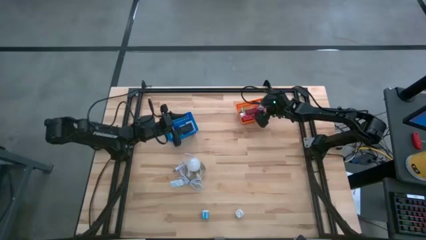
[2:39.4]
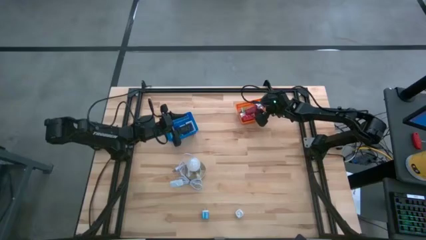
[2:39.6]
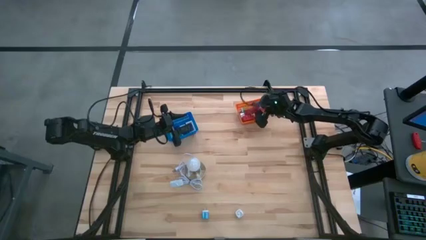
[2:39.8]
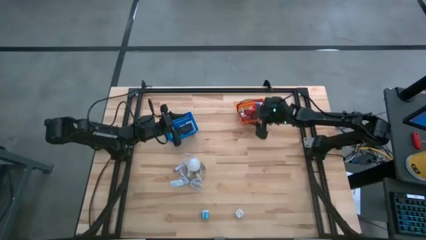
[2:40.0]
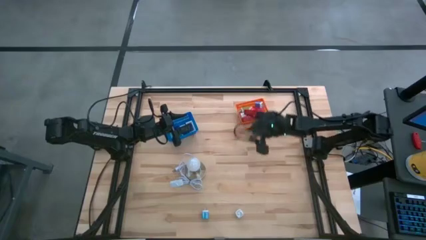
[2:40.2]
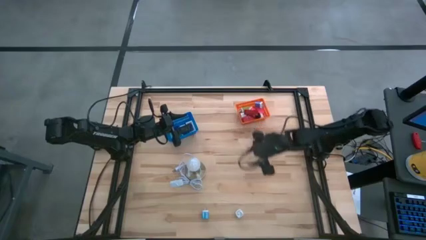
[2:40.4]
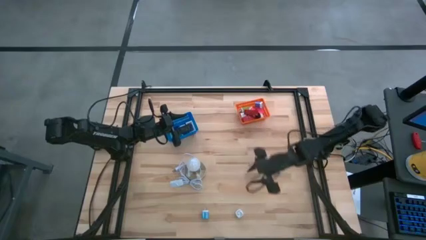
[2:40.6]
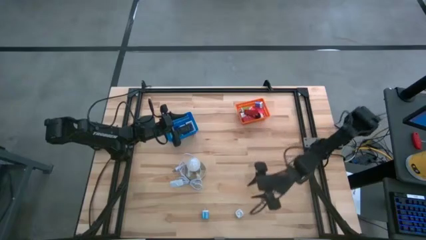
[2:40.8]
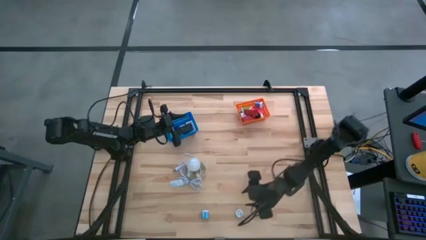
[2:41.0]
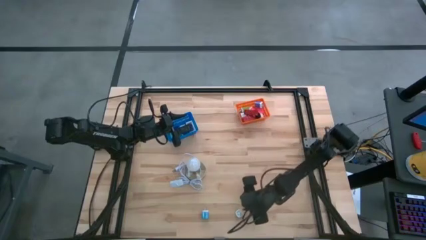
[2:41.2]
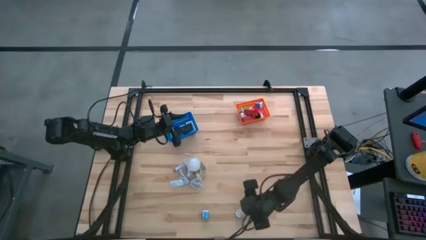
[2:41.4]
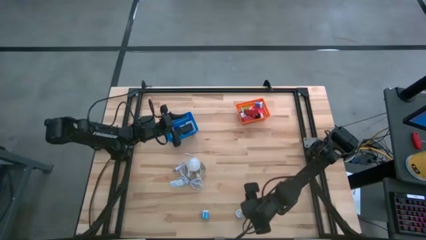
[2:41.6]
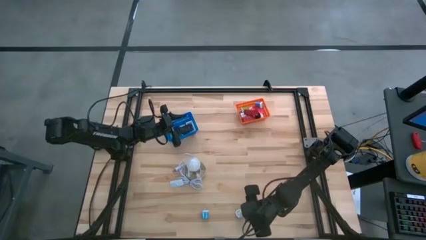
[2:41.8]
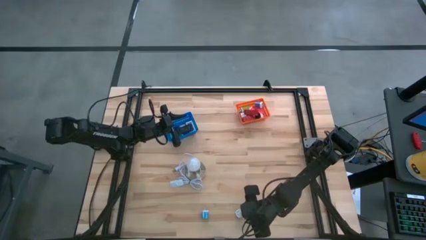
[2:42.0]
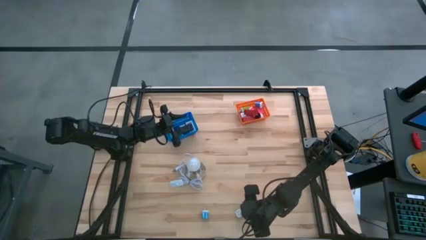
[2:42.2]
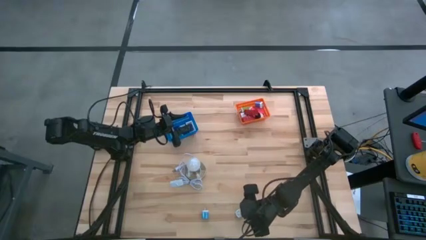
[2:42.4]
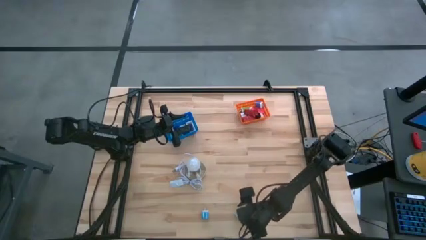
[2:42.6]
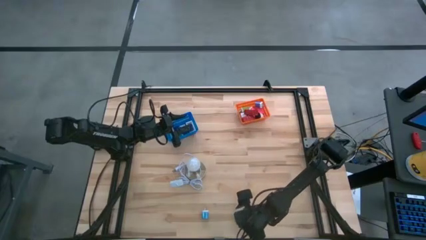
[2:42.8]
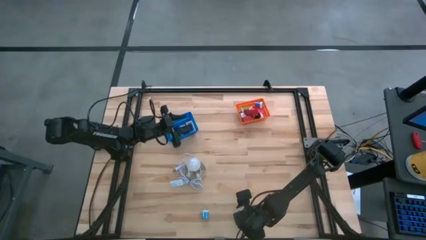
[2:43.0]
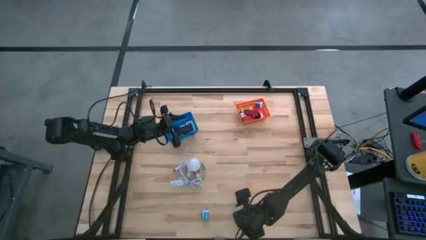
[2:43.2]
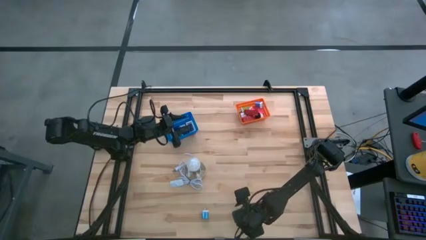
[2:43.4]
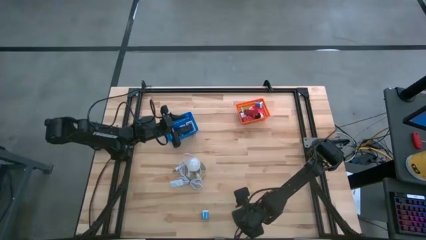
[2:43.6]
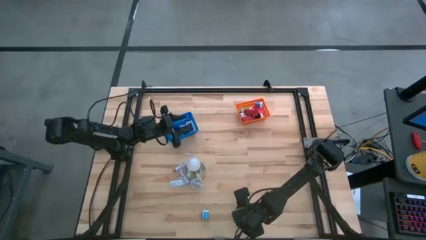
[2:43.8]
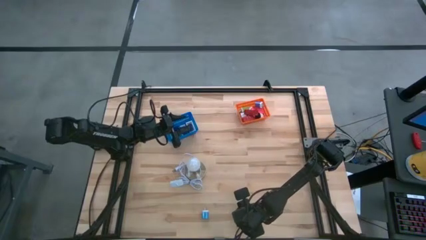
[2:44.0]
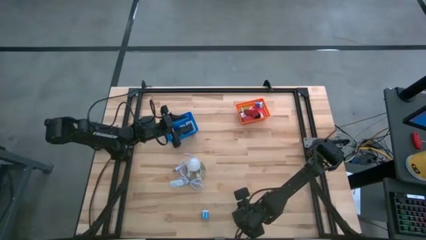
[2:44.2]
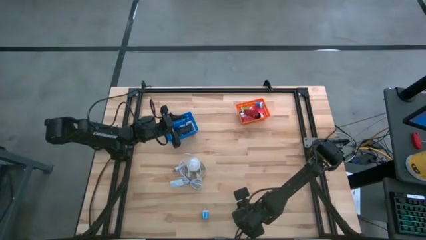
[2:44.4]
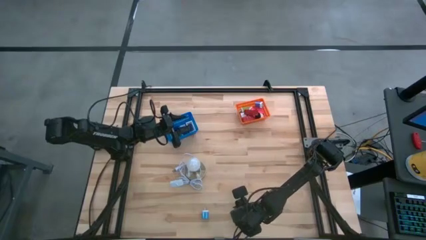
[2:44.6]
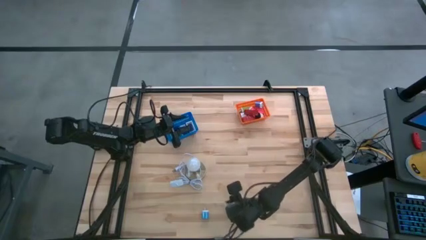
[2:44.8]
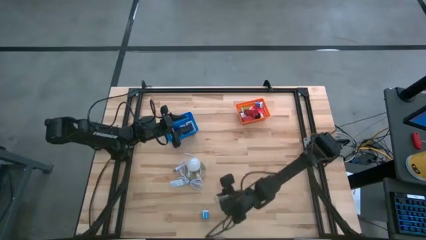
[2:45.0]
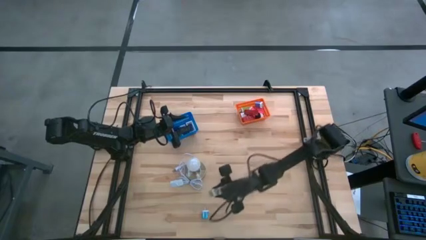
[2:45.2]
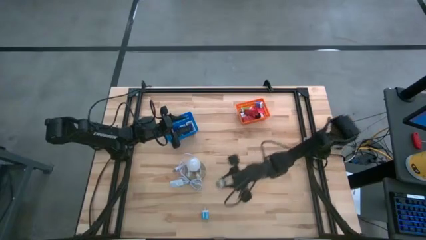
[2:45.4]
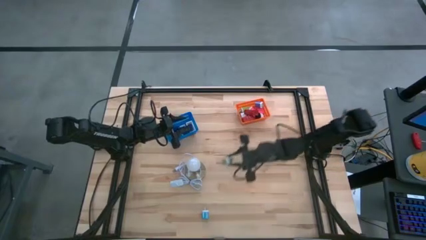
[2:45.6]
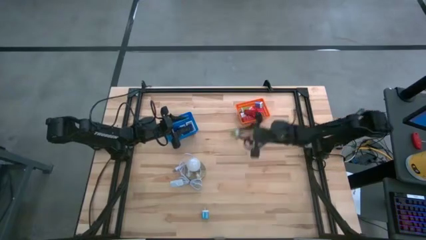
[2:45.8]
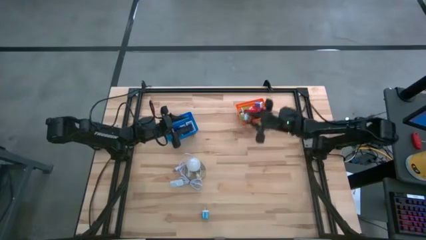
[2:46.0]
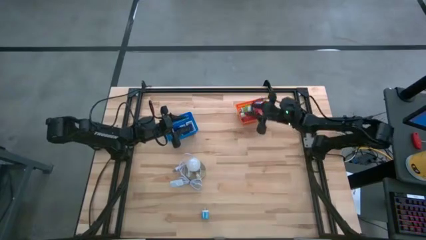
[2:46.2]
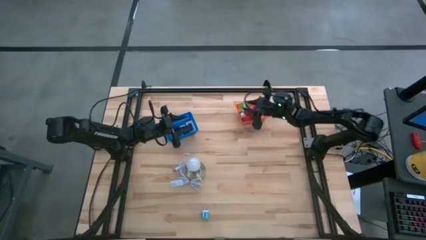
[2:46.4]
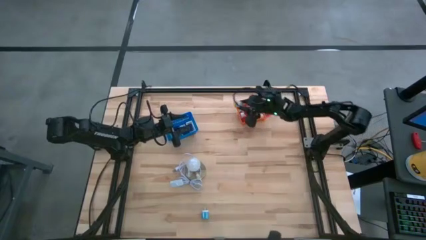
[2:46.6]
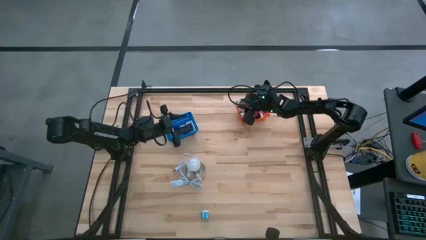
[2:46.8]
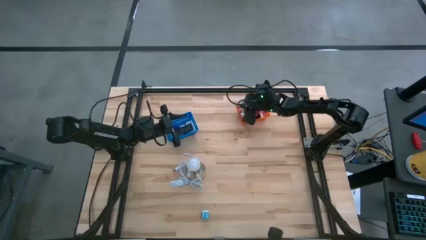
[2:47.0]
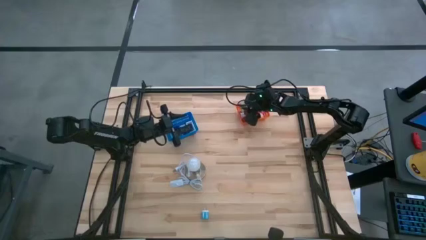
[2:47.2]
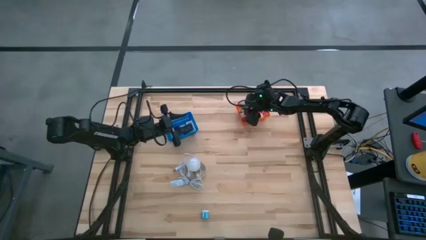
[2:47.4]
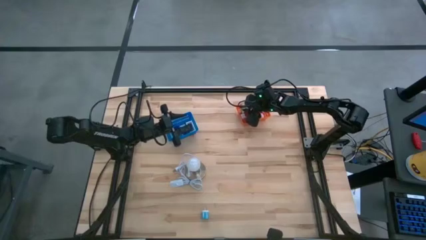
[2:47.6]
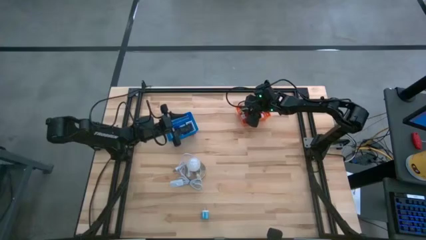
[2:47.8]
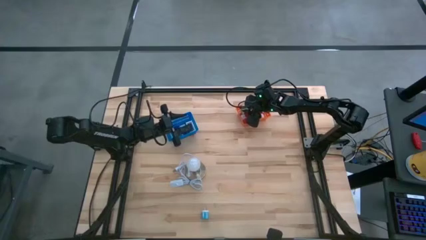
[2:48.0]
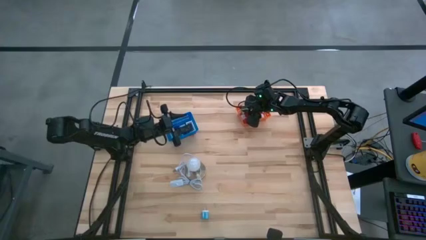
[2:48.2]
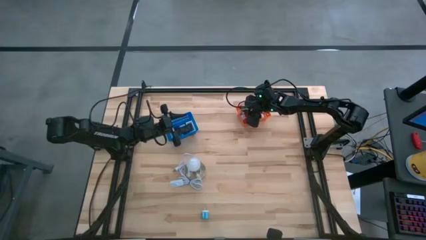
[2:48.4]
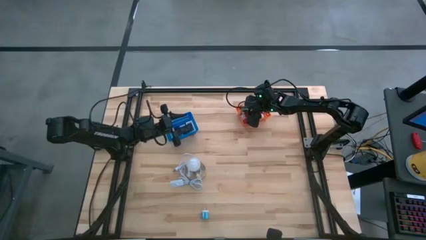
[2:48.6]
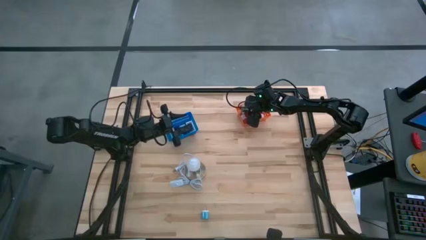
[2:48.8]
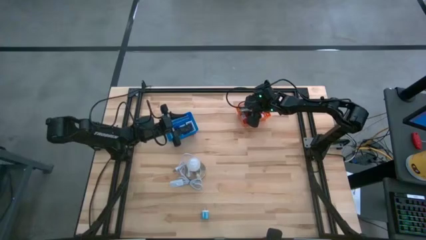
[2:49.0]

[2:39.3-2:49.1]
Task: Pick & Place Office items
Put the green charger adapter into the orange bin

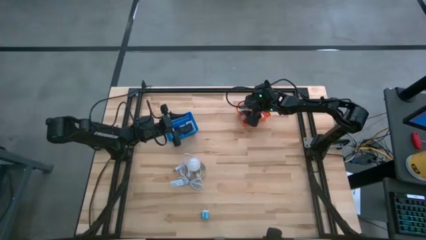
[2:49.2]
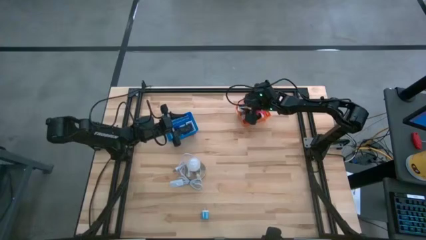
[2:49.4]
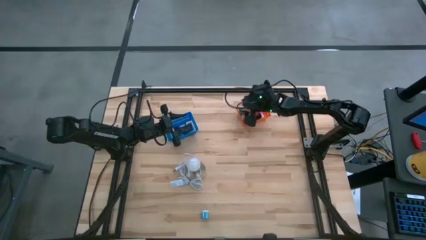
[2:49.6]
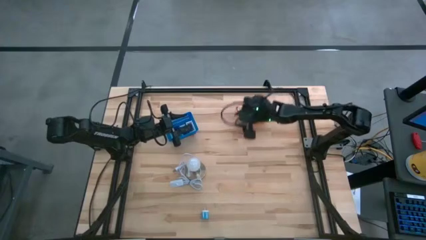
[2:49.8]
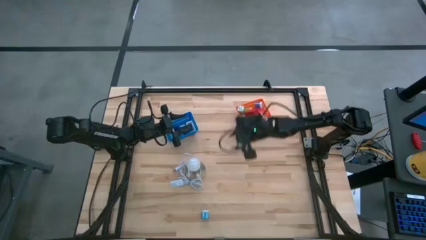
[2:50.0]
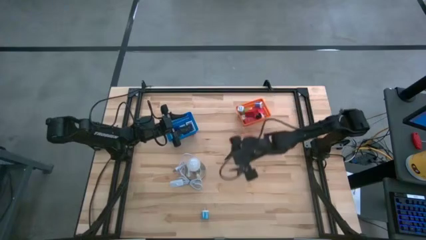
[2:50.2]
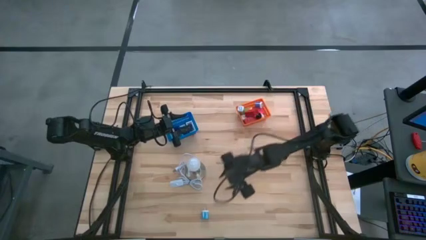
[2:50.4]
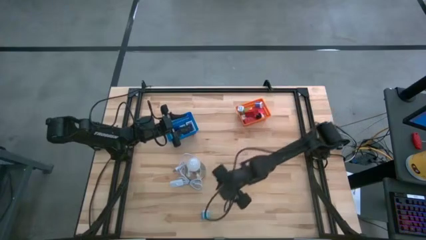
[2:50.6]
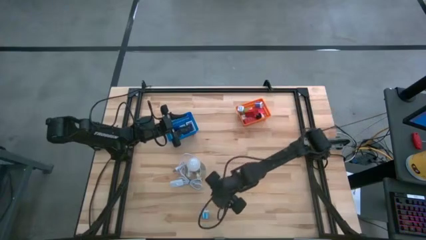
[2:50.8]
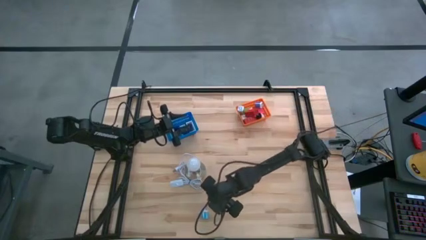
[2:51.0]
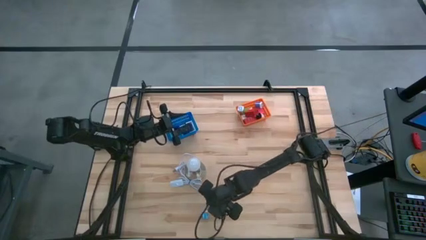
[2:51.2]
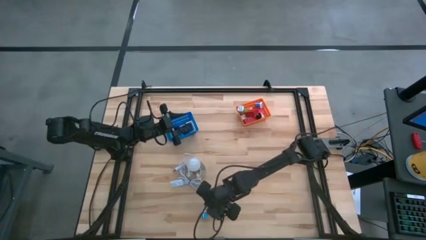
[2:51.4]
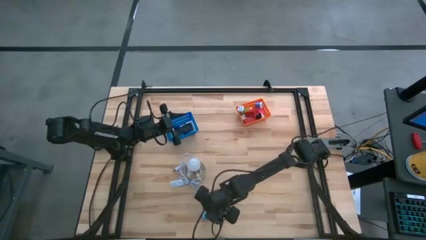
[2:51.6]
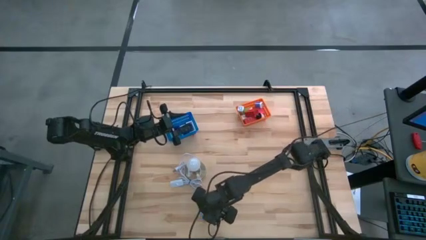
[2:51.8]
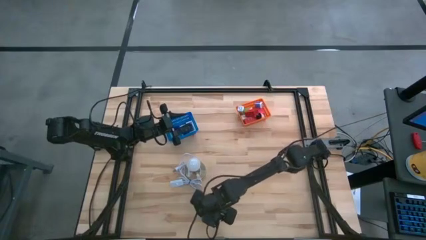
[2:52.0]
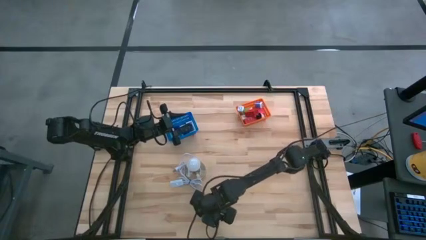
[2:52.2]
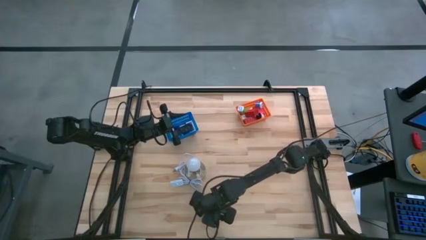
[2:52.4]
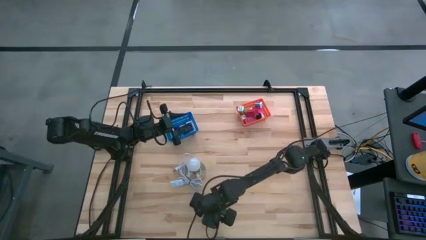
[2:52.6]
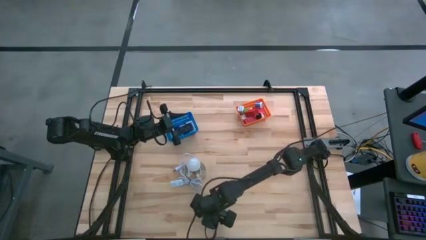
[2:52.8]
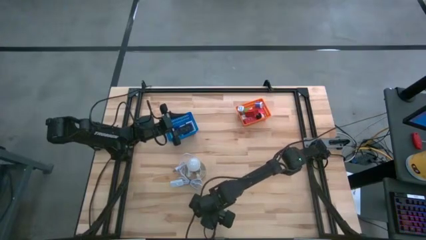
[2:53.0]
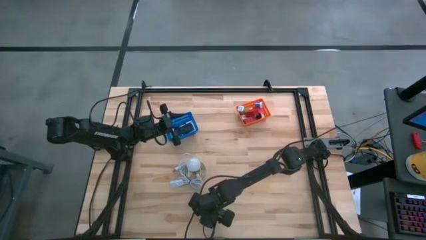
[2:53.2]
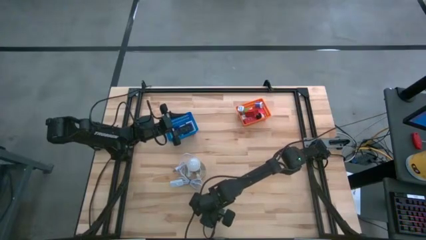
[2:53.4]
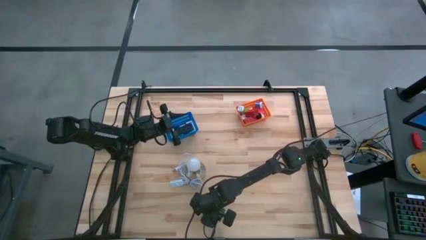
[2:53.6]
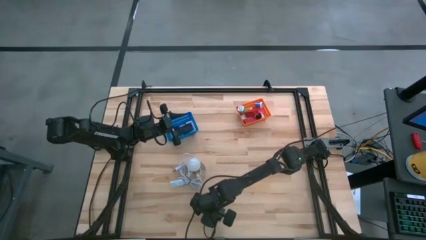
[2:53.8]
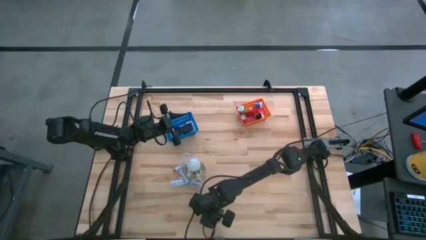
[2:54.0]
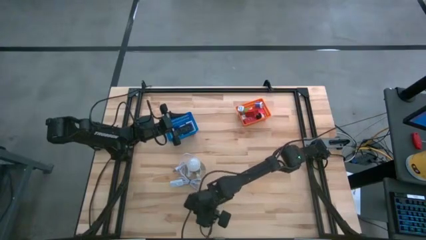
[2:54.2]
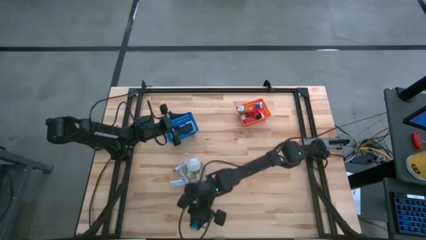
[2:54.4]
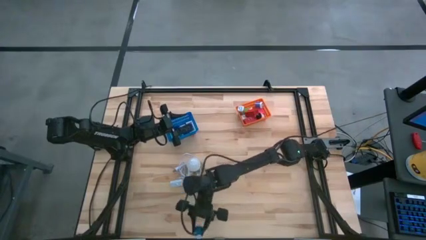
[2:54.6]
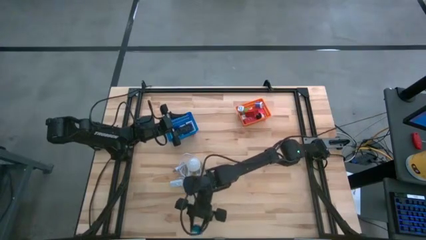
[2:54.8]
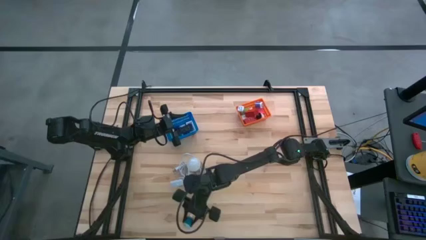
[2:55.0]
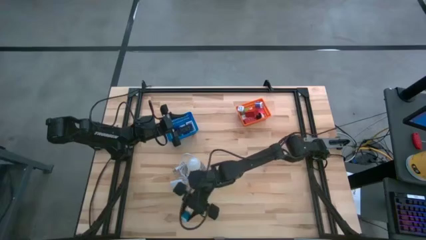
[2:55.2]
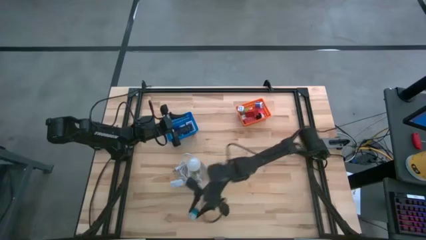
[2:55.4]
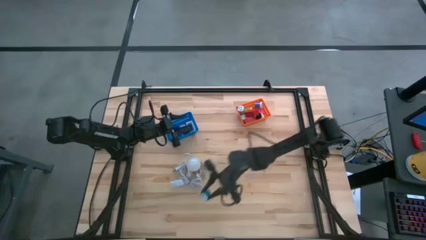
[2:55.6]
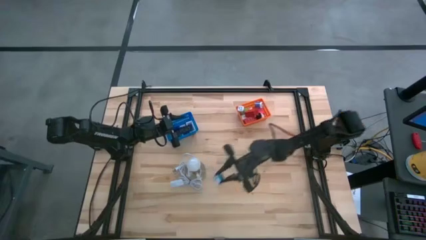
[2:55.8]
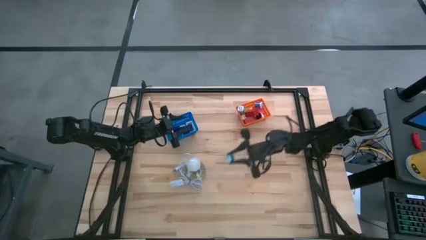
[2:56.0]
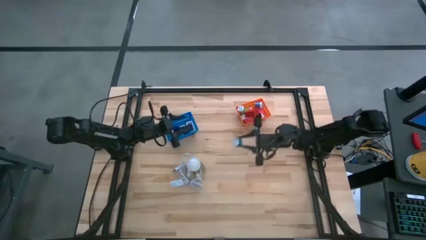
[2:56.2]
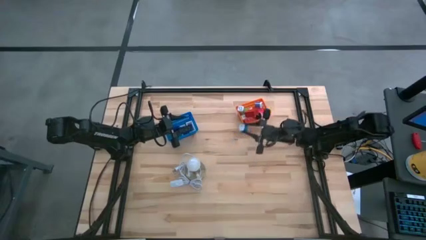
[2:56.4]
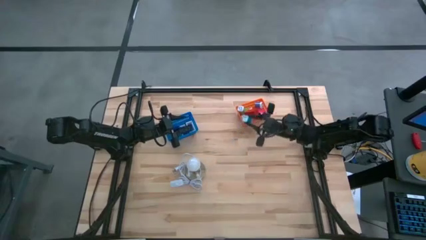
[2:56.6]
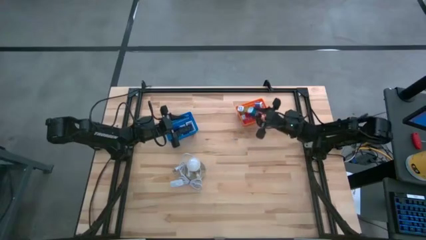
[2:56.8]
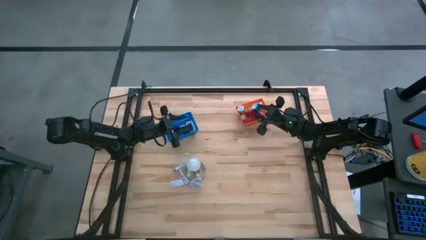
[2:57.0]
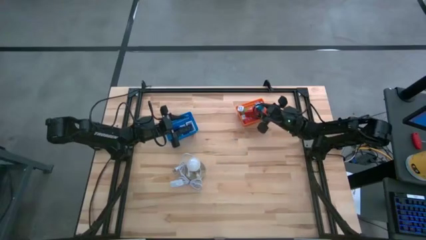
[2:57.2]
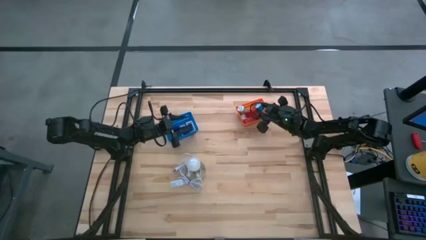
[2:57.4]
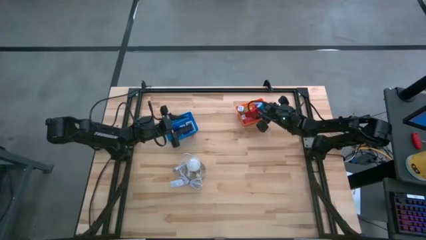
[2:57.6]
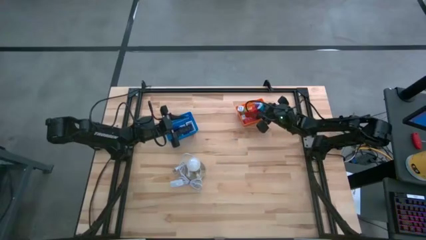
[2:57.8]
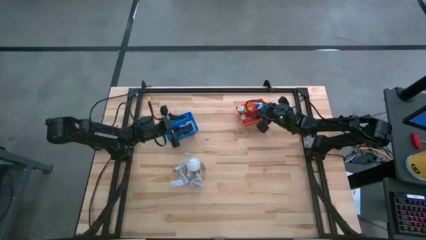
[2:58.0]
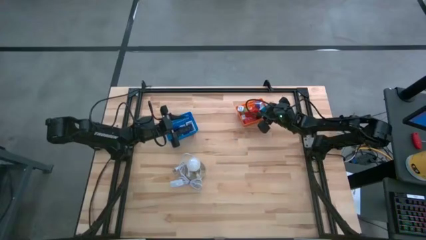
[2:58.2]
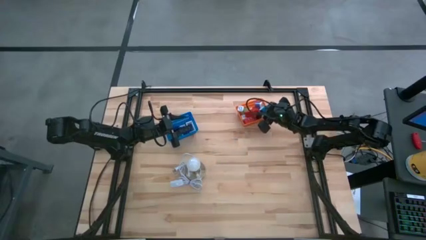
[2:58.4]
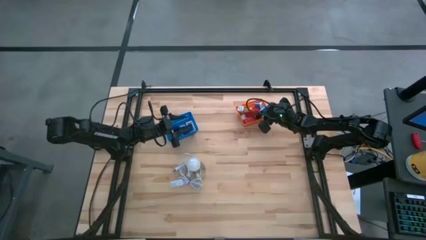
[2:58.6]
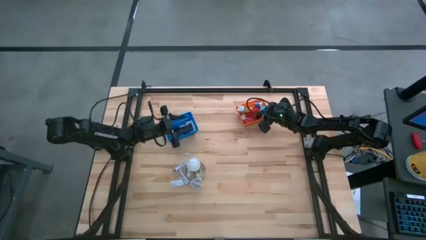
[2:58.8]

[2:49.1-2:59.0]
Put the blue charger adapter into the orange bin
